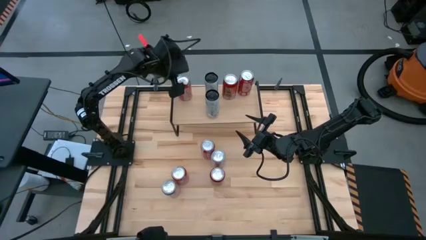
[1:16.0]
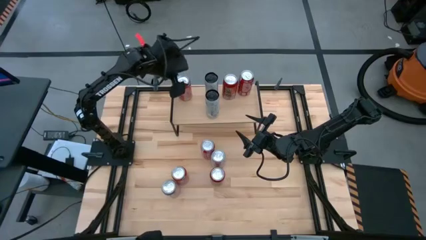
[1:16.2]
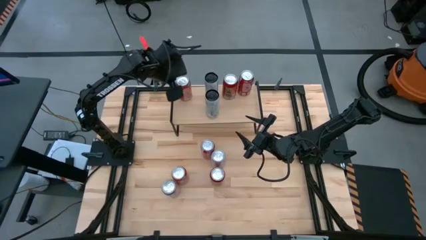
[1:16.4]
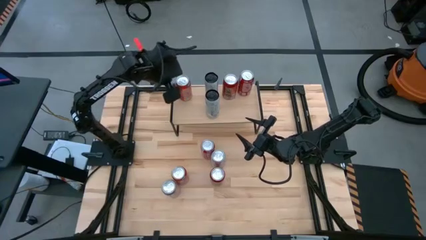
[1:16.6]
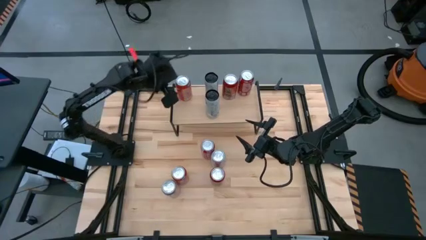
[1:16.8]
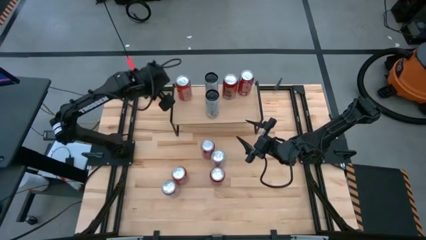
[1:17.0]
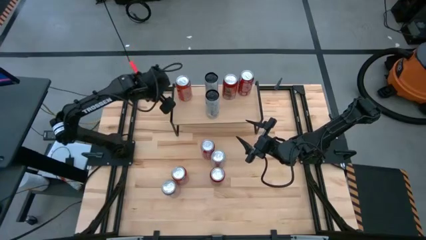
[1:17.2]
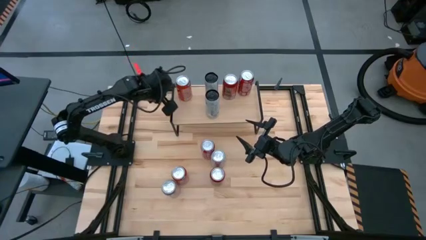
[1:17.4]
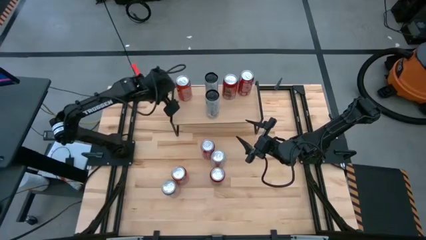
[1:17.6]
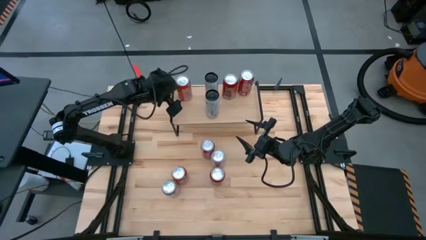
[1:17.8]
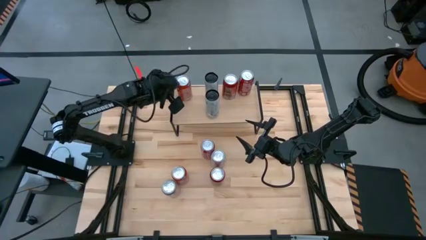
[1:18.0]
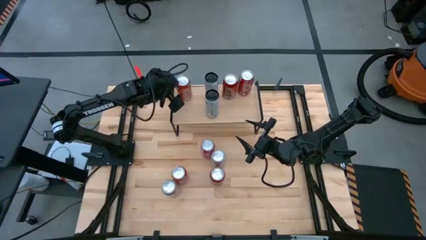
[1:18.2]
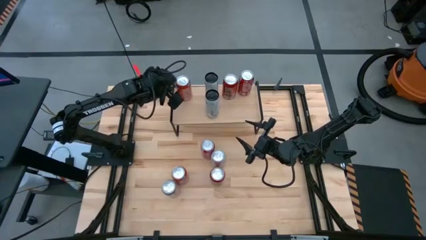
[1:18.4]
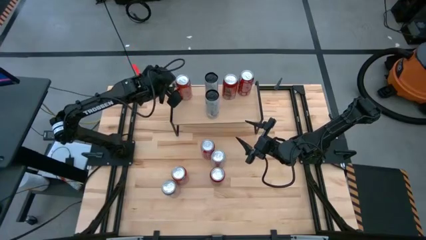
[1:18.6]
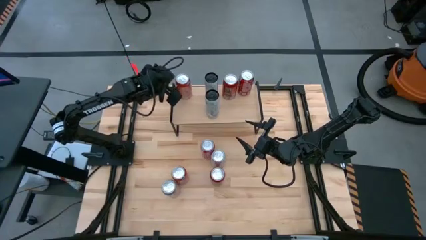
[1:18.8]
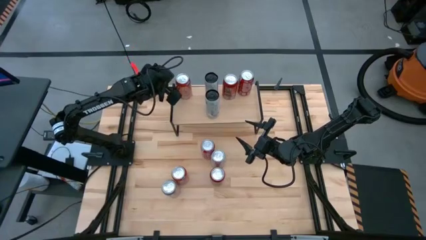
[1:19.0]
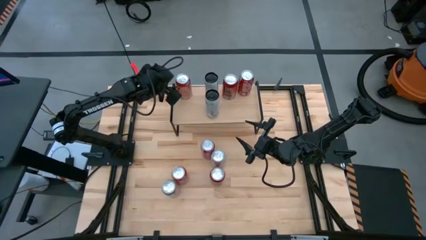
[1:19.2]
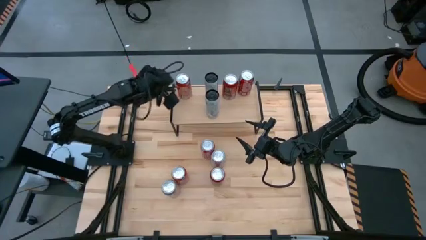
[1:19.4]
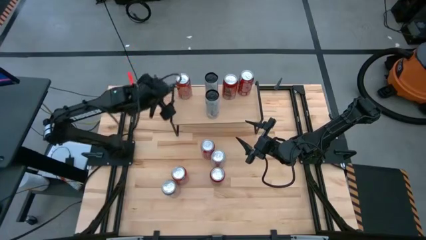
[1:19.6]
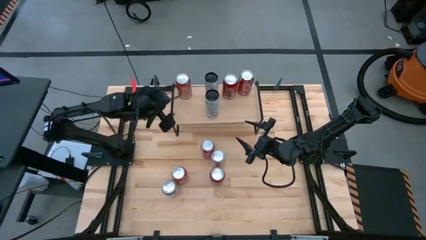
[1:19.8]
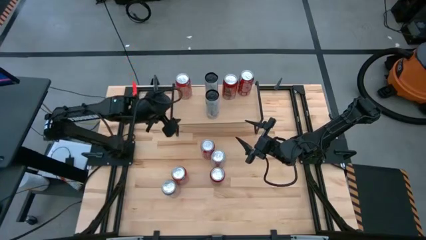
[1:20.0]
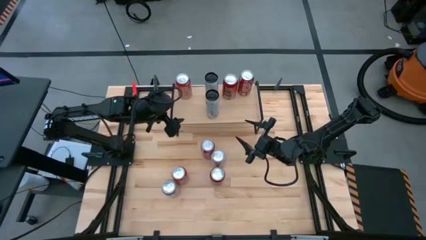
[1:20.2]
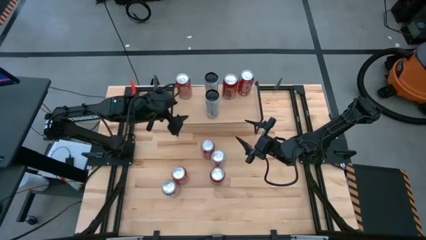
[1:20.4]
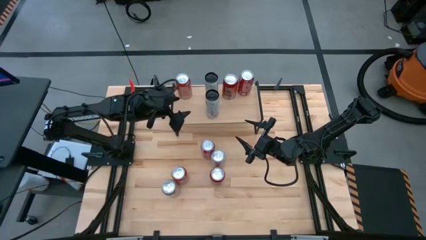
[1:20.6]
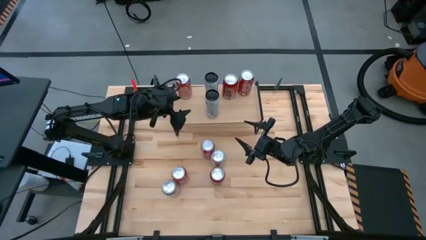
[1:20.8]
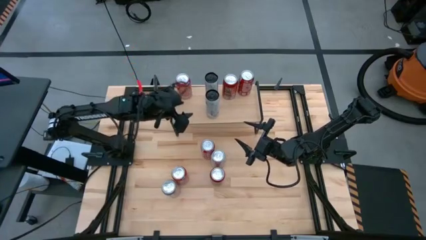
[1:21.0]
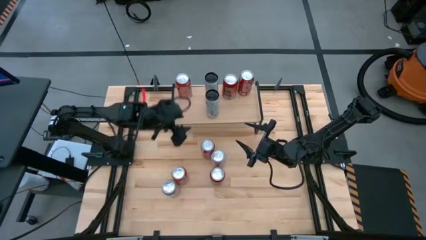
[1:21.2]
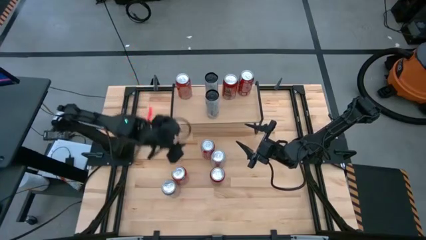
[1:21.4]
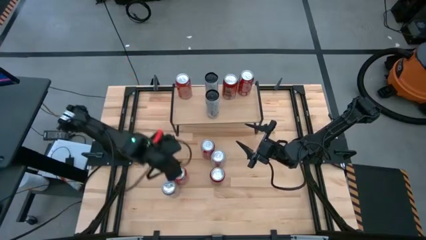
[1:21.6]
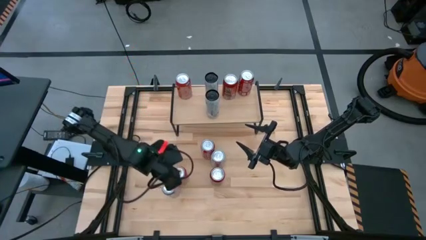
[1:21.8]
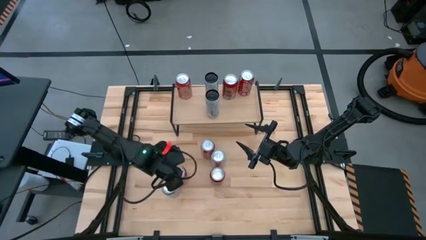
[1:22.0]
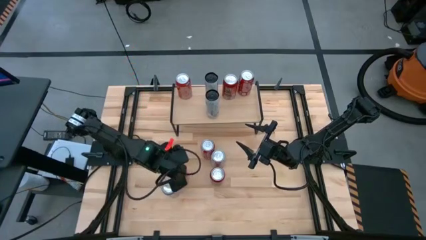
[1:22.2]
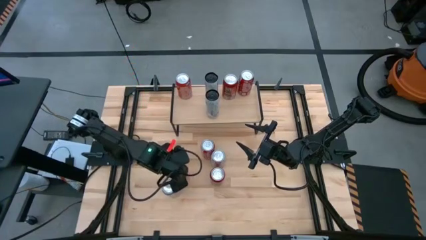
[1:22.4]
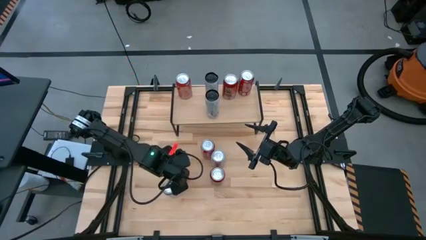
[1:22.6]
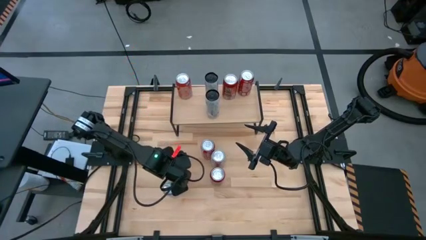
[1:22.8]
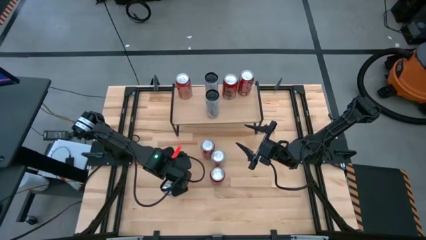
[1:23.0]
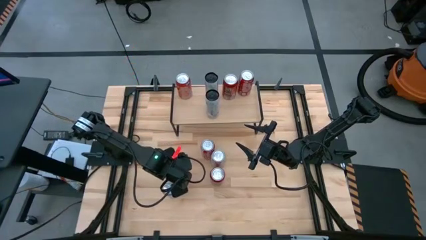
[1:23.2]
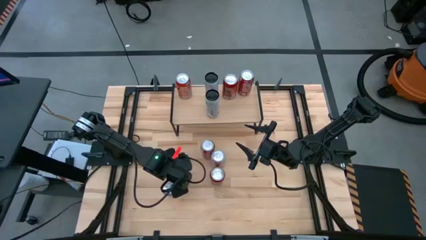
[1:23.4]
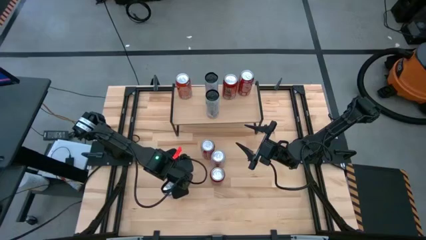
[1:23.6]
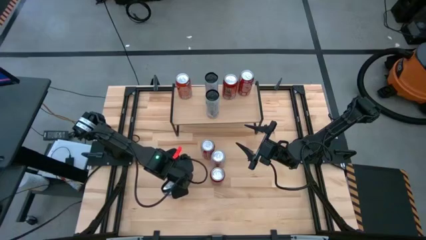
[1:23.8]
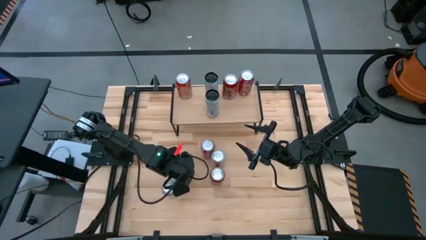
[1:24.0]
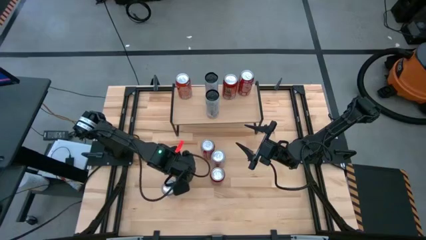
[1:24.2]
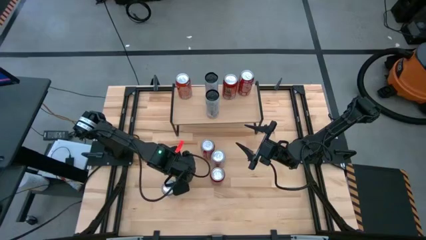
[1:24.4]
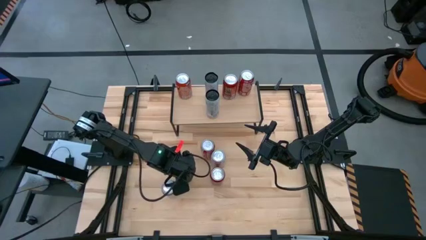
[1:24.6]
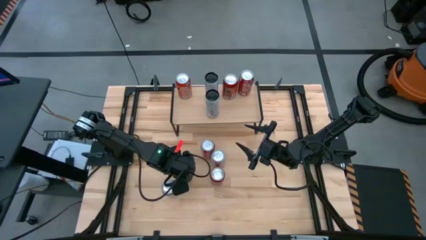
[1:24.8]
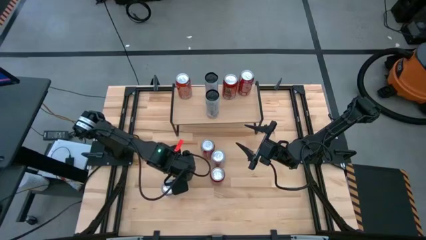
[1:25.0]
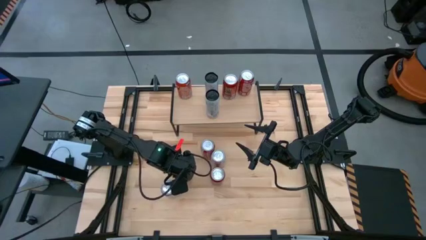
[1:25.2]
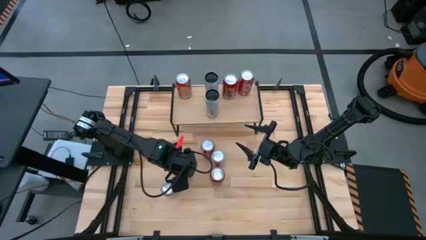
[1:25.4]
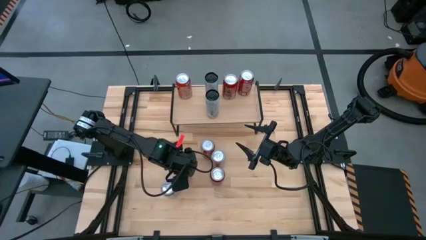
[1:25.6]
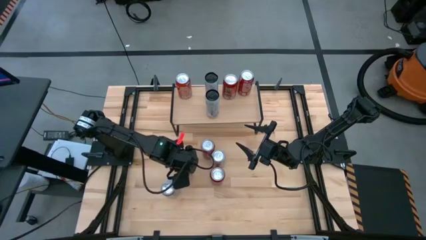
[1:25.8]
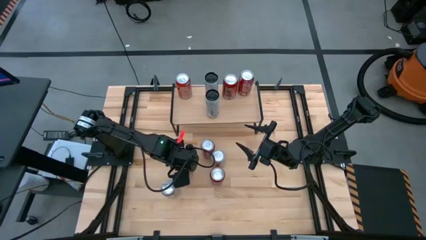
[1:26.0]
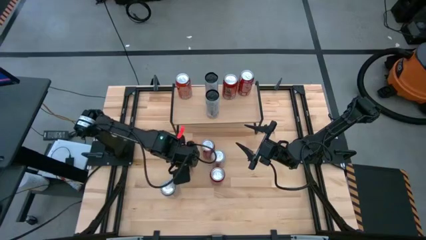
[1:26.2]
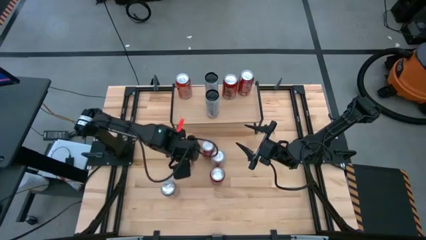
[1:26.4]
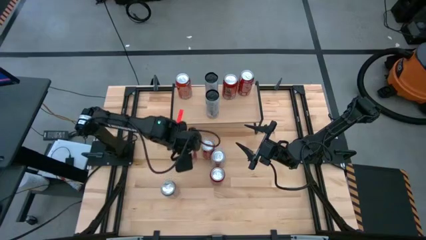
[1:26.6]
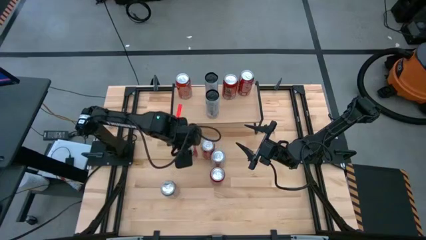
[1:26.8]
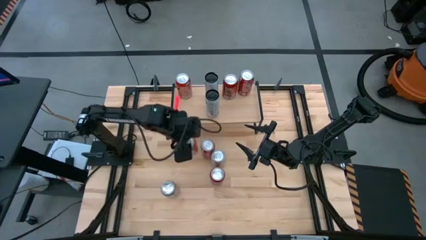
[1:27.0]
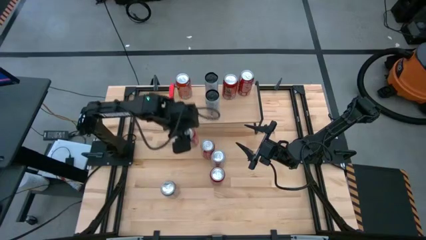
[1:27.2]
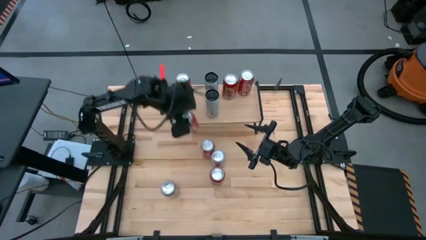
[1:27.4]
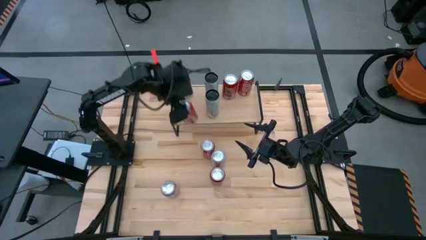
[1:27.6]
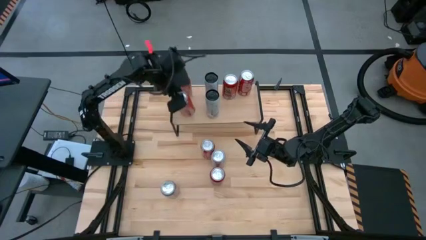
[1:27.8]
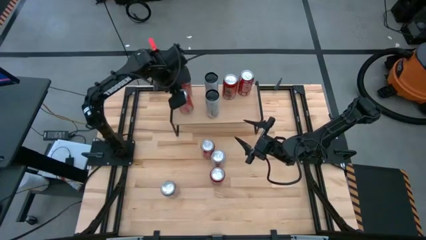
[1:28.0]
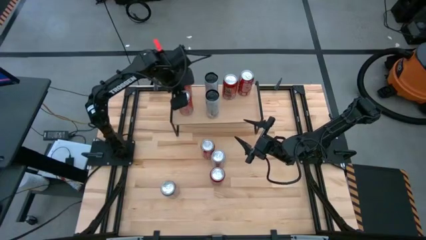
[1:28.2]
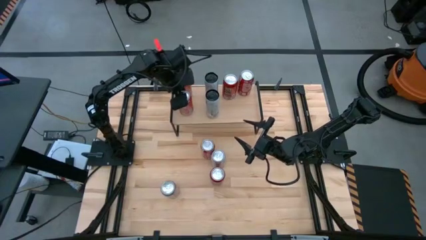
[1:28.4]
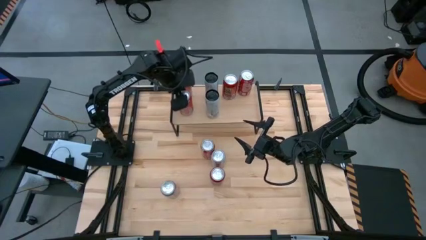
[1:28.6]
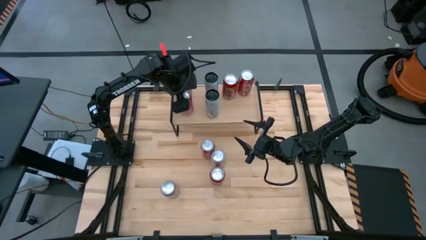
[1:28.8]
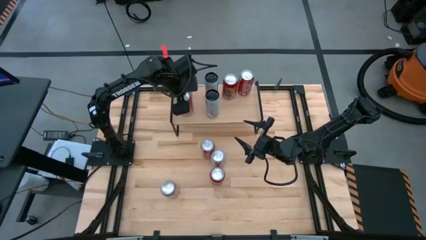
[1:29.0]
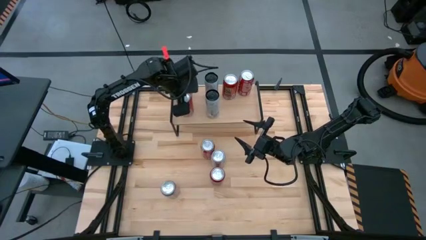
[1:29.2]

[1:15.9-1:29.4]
Task: Place canned beverage on shelf
Put the orange soda can on the shelf aligned with the other orange soda can

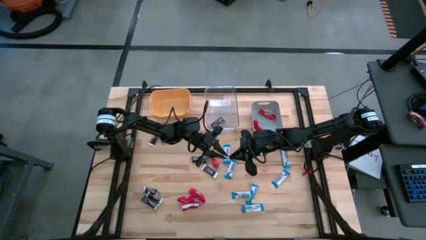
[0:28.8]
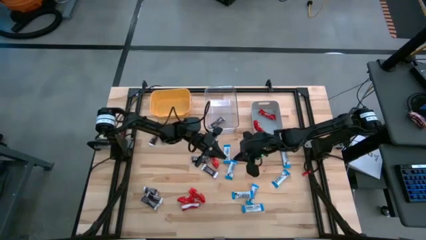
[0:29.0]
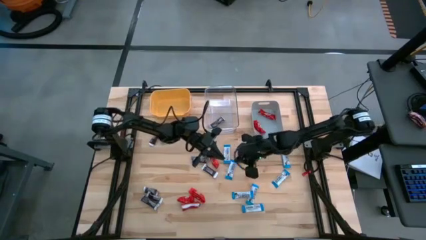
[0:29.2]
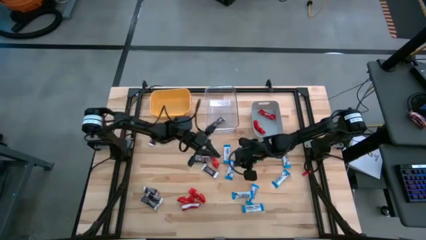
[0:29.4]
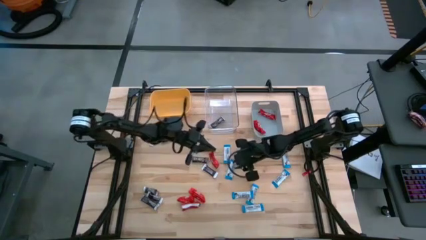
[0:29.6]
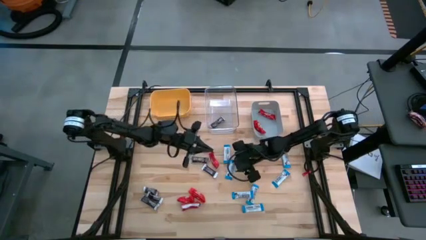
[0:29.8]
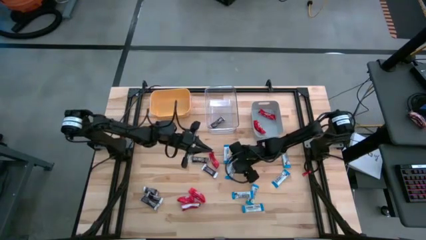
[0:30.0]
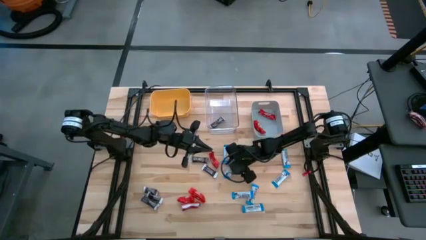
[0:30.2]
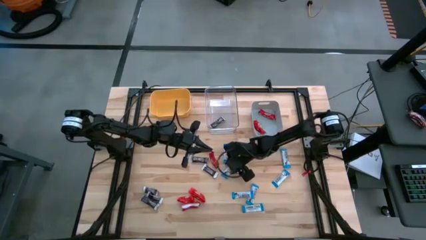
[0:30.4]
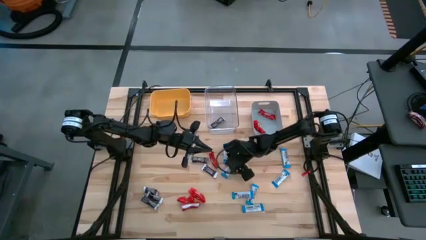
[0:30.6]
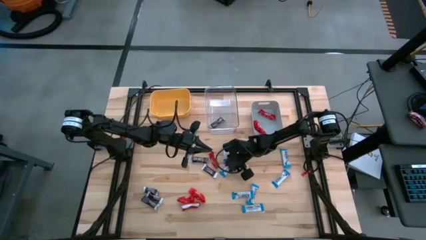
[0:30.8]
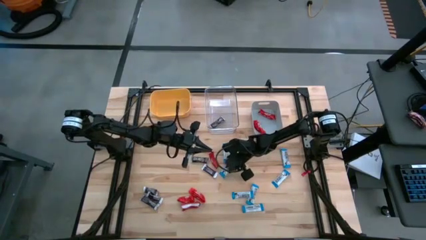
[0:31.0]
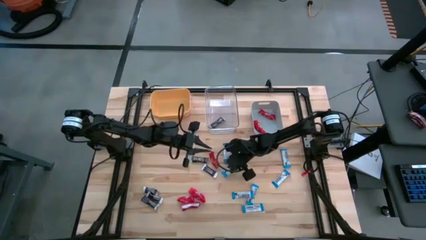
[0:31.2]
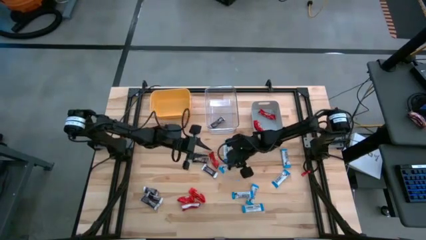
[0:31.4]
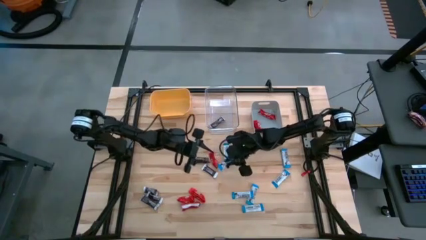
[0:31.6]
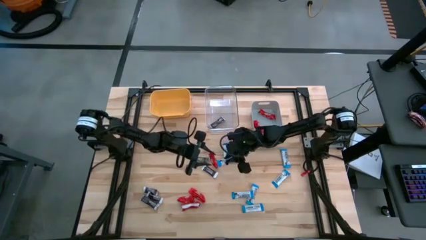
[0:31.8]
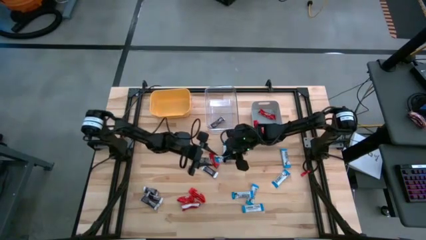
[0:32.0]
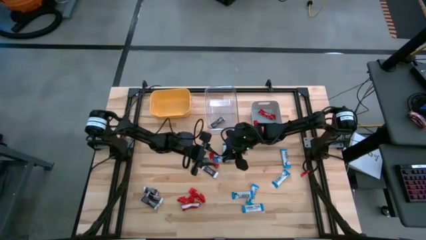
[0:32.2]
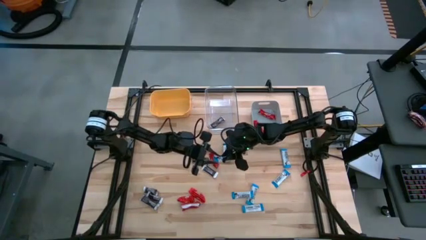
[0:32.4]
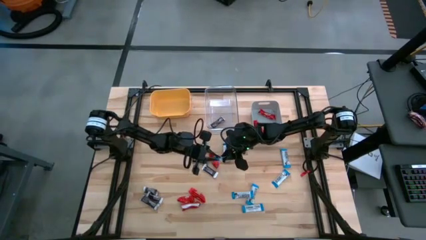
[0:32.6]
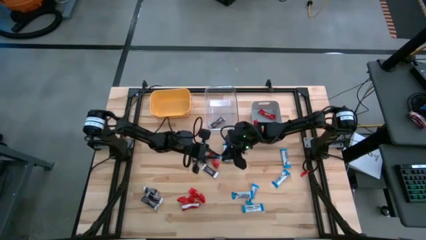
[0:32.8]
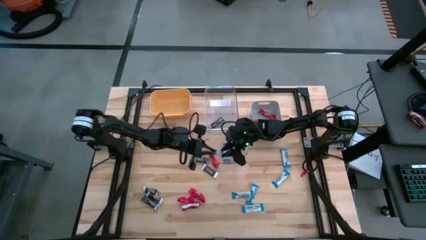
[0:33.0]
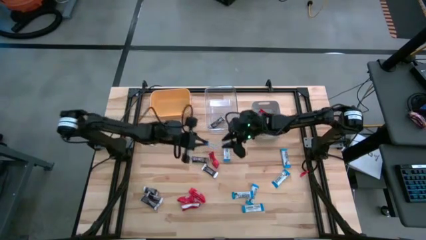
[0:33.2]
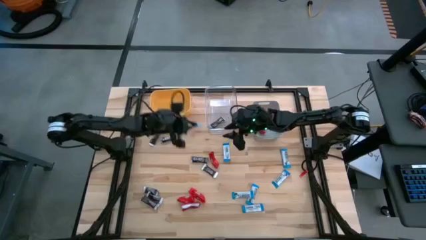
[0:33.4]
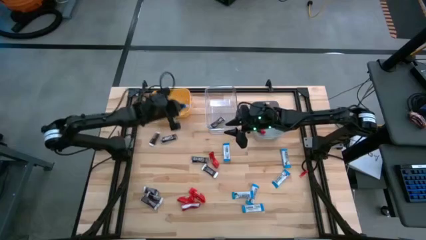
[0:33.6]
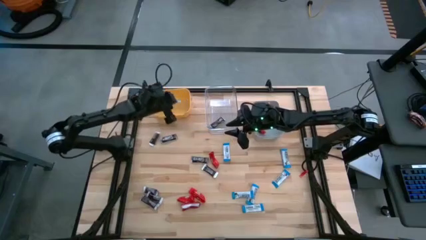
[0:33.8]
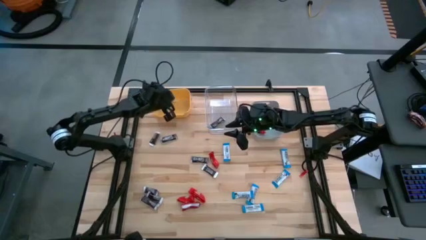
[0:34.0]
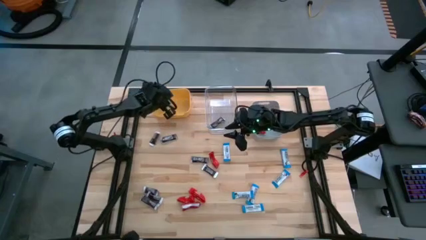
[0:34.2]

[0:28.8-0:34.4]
Task: Sort candy
Put the white chocolate in the yellow bin
